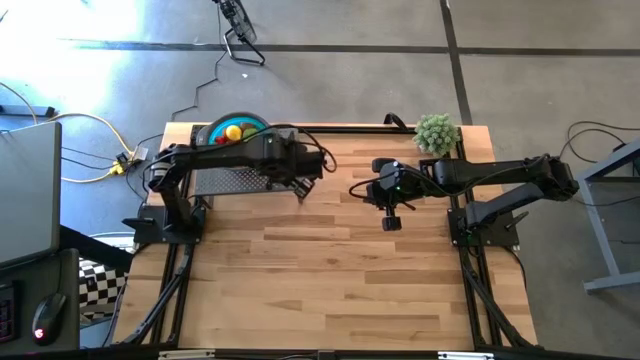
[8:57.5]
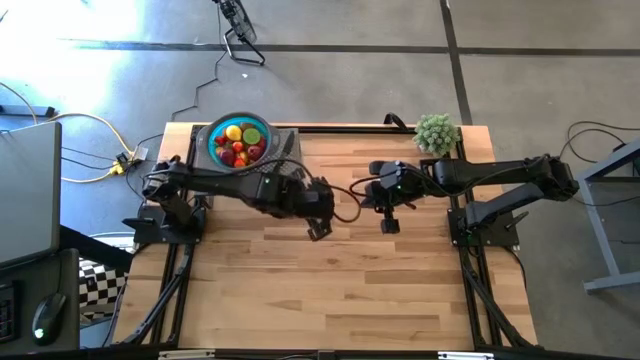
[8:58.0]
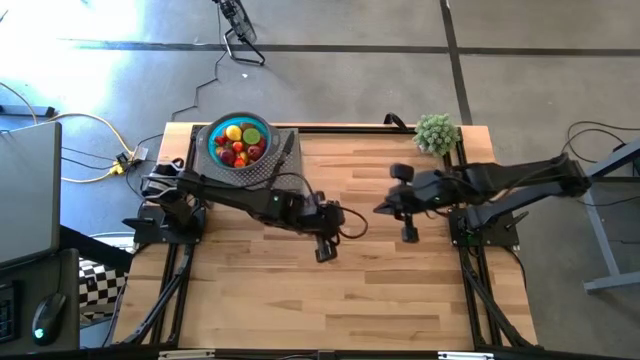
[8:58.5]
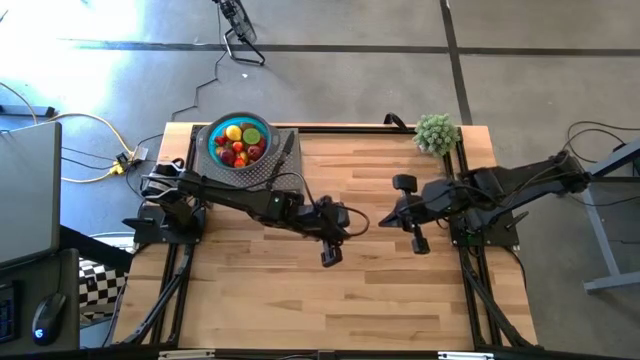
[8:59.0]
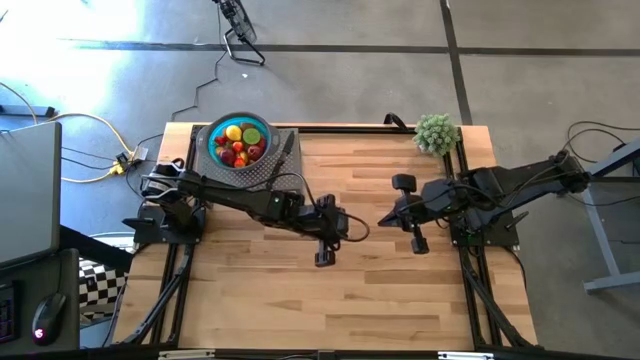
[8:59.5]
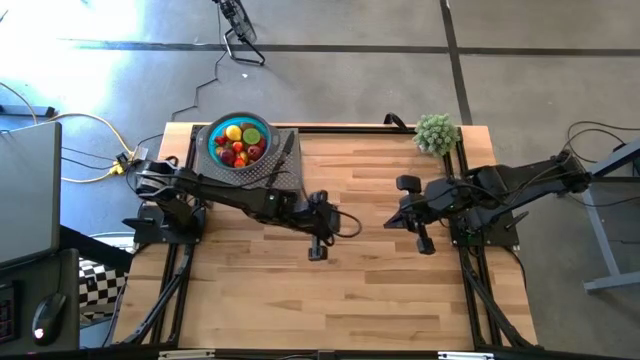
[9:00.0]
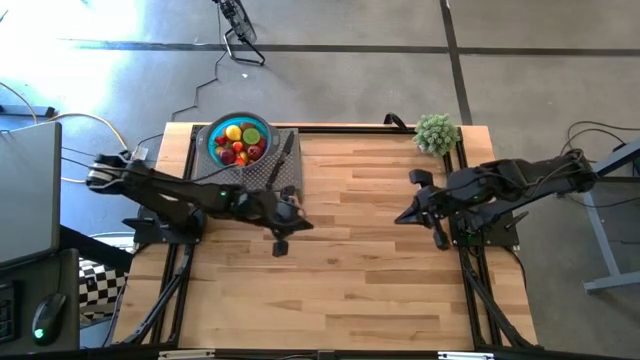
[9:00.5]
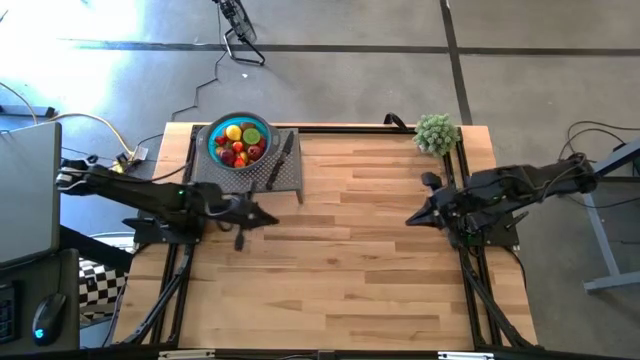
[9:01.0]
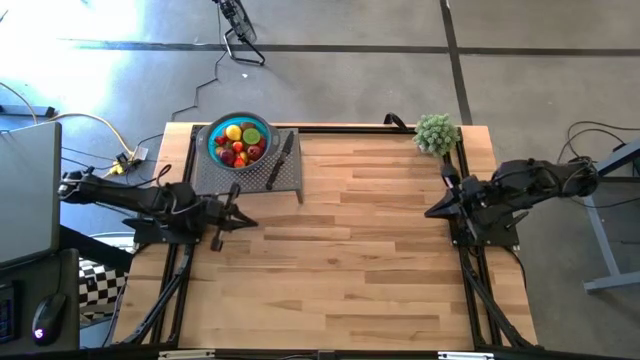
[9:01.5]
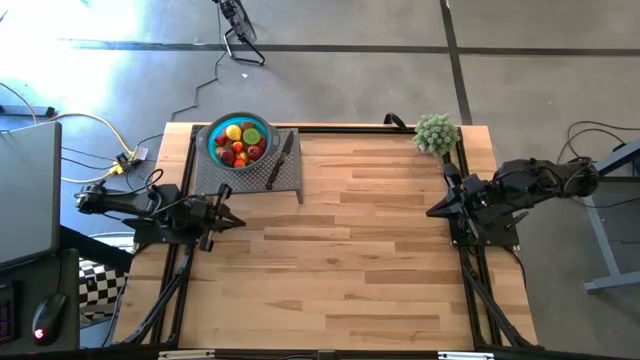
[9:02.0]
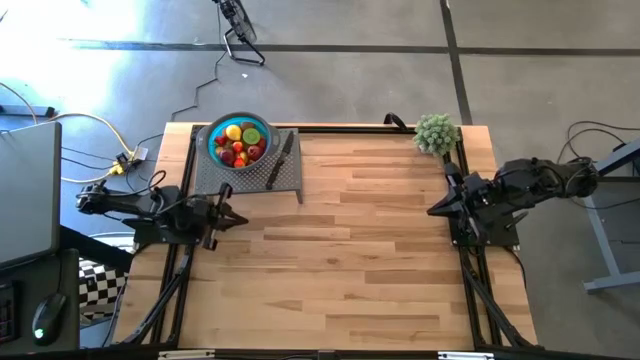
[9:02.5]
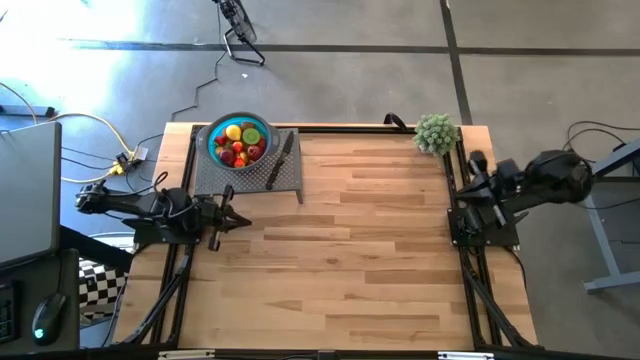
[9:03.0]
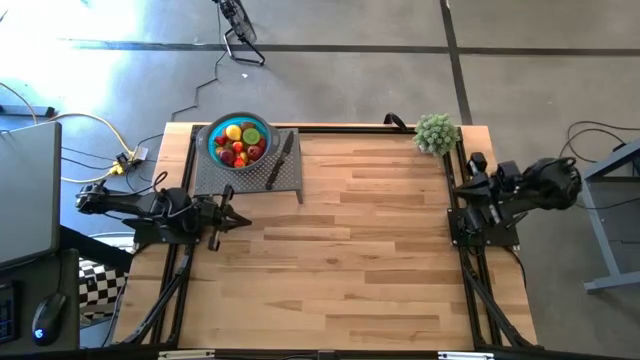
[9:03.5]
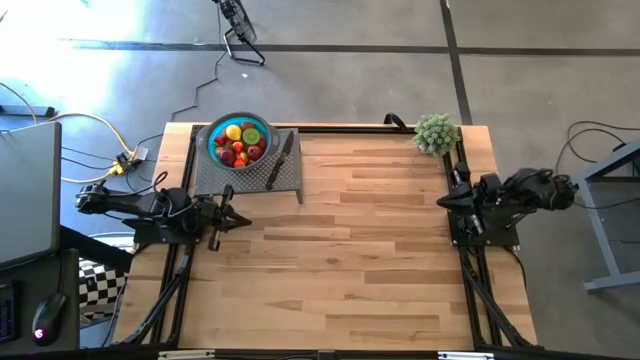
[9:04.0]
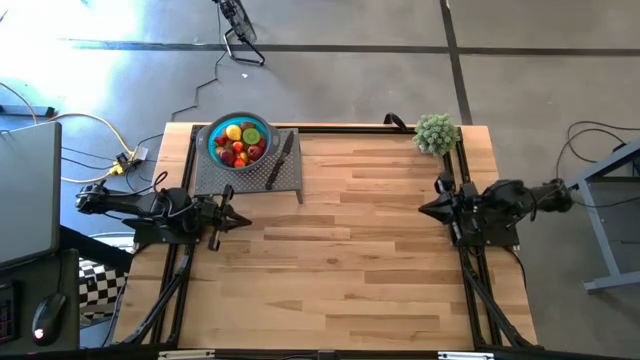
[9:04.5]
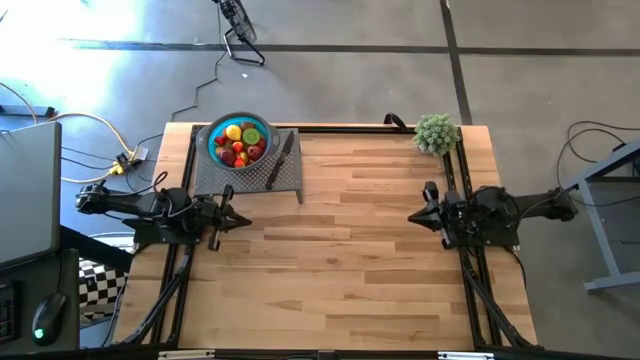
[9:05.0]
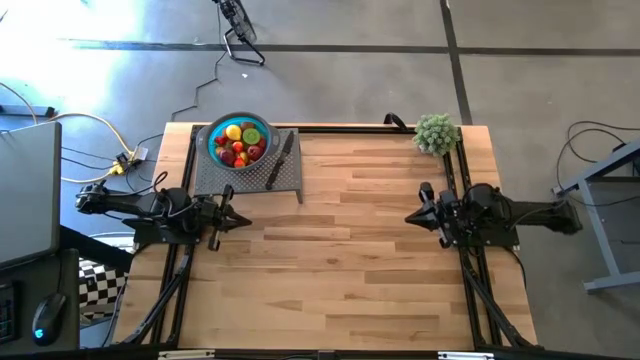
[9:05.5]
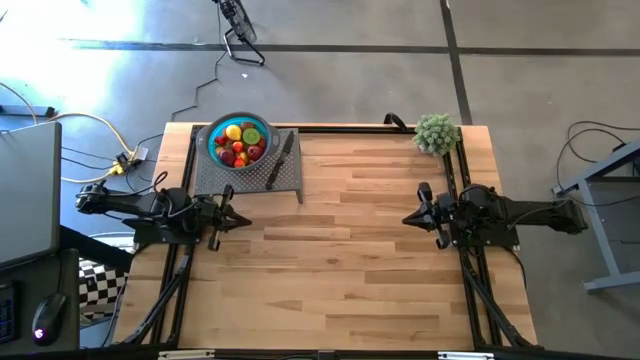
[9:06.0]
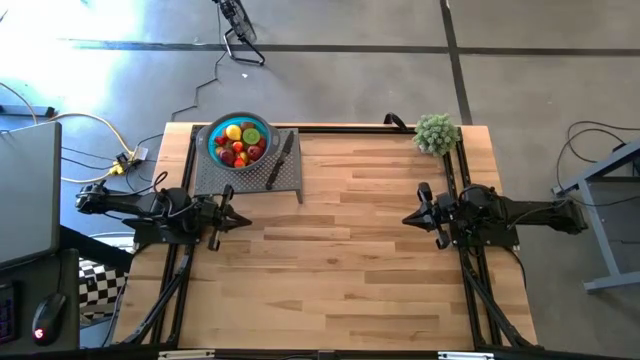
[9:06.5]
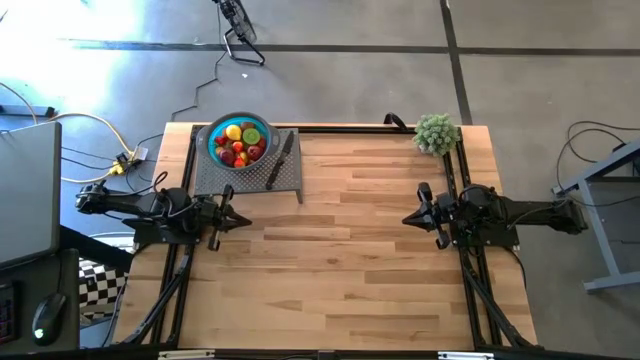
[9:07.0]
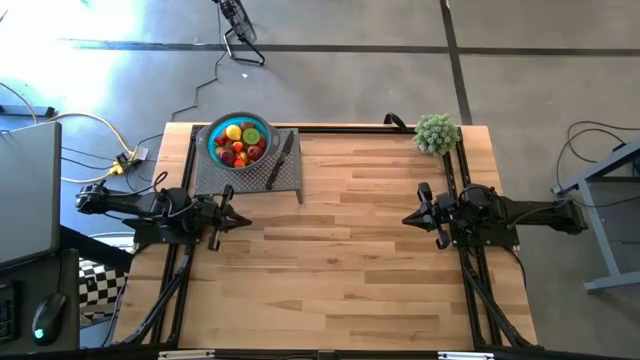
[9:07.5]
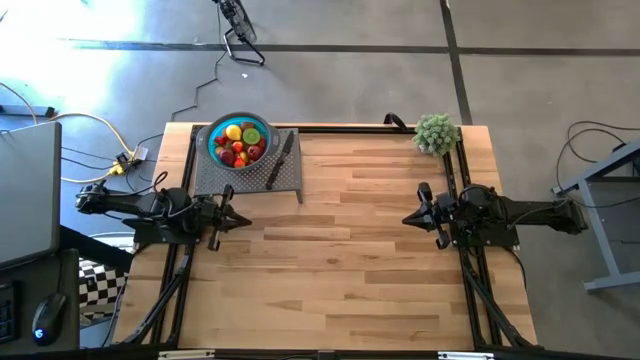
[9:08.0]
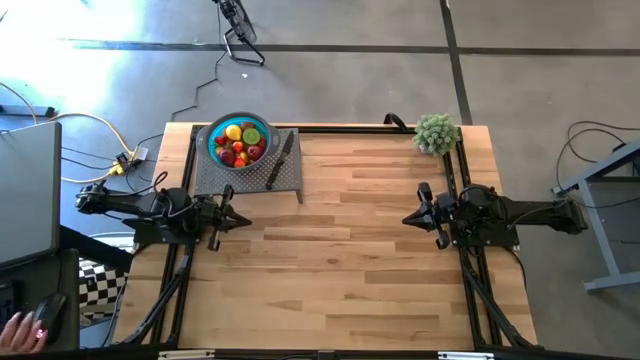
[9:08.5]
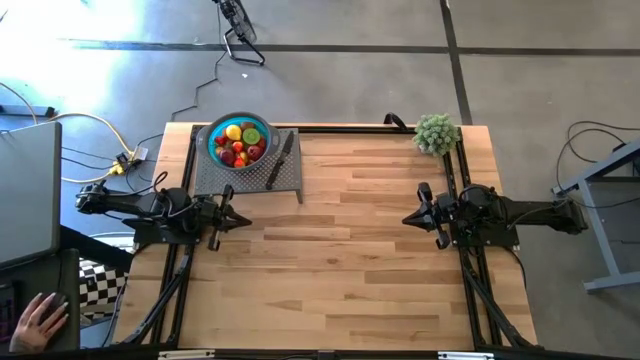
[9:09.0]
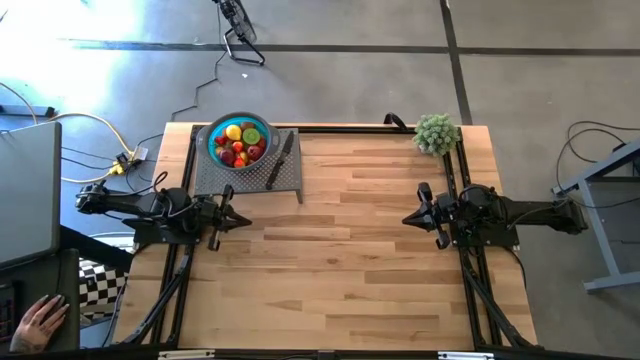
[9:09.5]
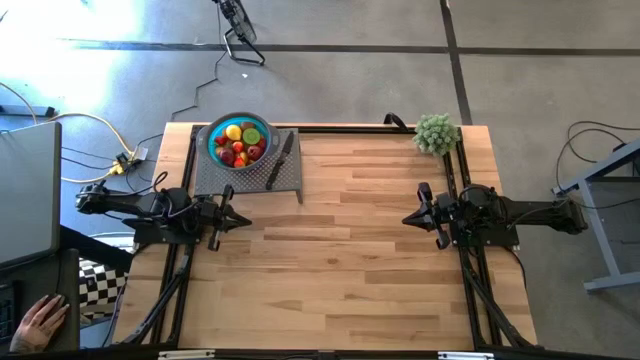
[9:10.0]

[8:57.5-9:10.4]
Task: Pick & Place Fruit
Return to Home Position

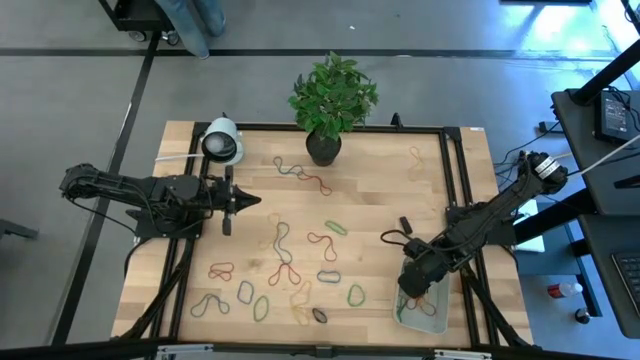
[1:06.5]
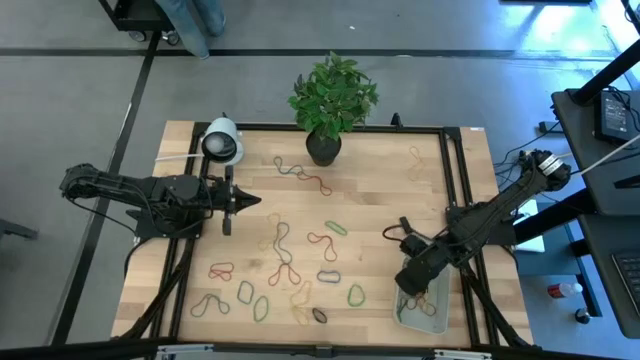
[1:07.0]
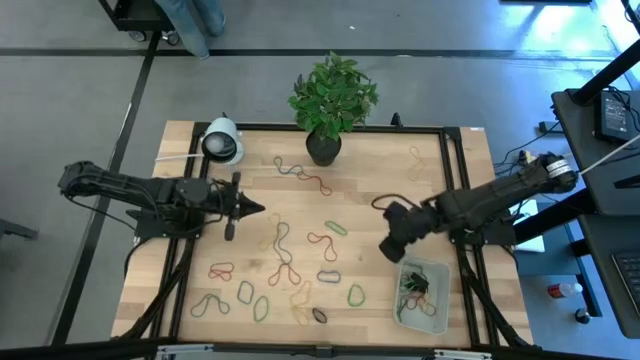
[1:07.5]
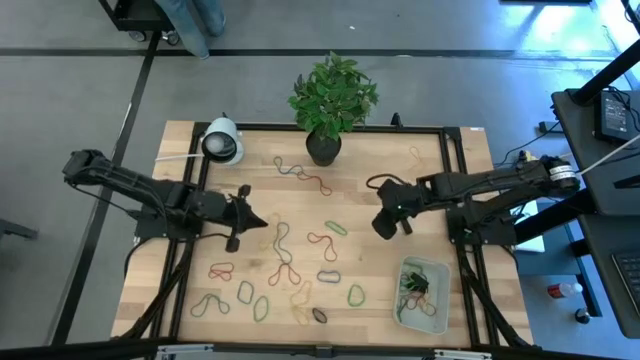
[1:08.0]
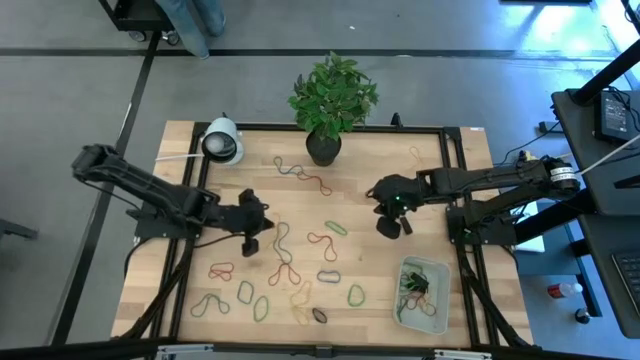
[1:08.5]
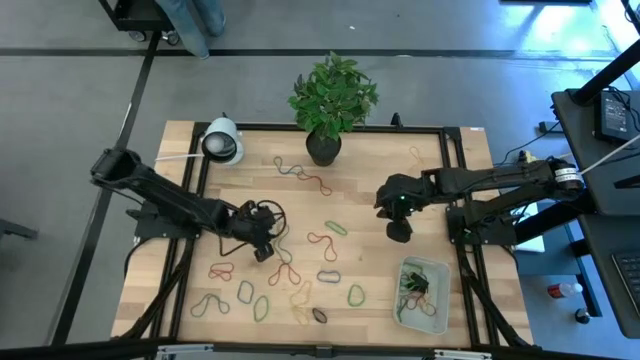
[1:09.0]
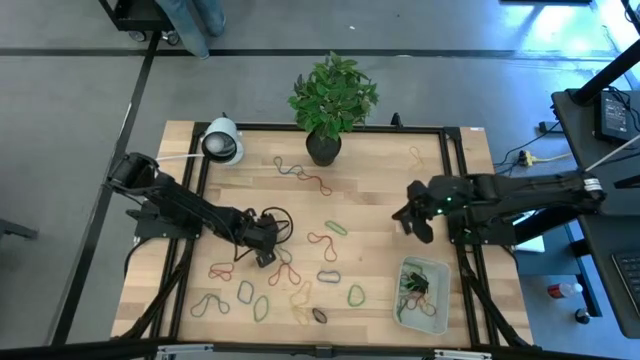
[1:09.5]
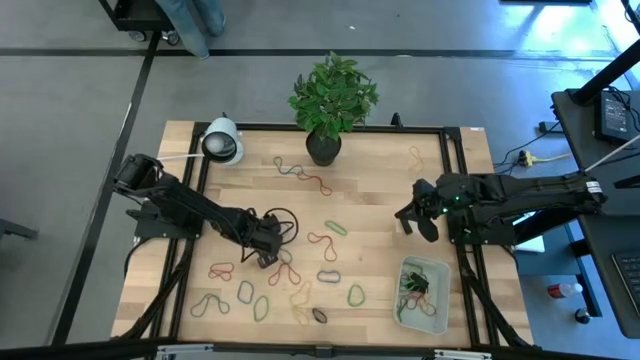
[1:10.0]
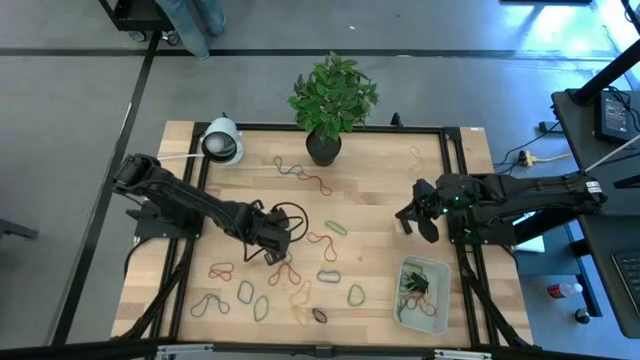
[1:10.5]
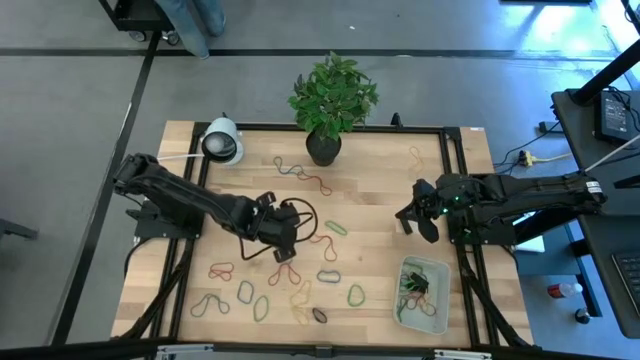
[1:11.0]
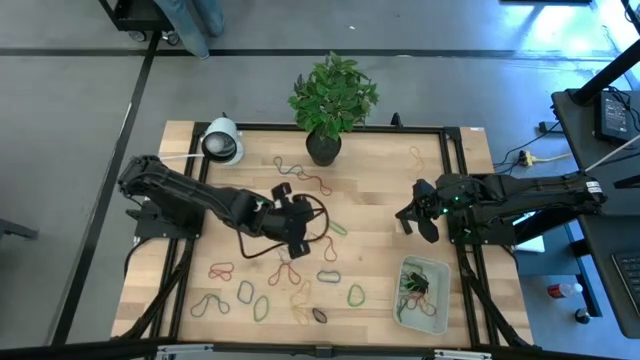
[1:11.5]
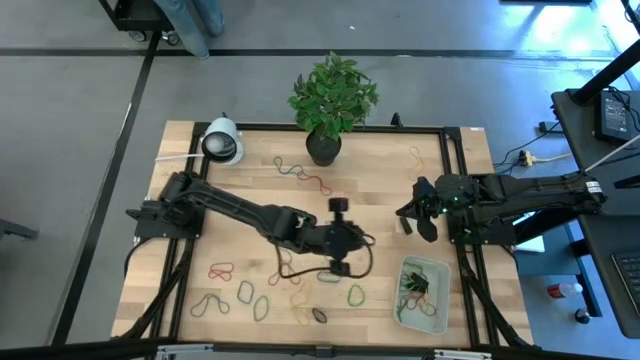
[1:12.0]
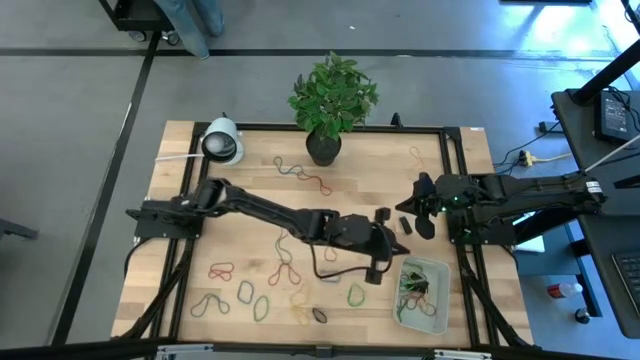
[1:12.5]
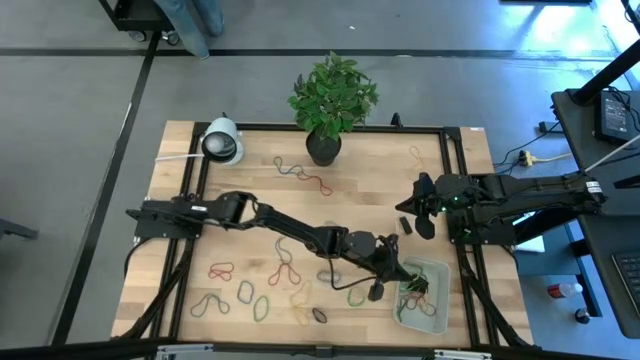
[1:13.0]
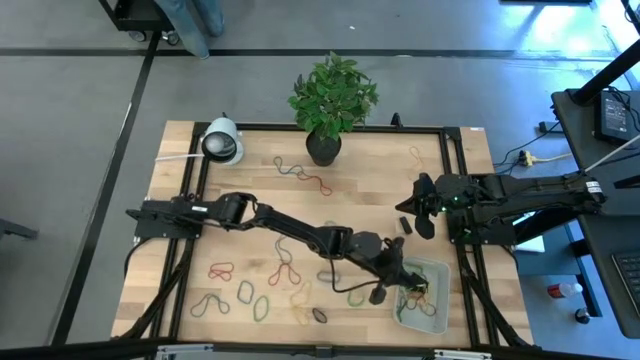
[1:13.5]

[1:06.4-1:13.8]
Task: Pick and place rubber bands into bin
Put the yellow rubber band into the gray bin
